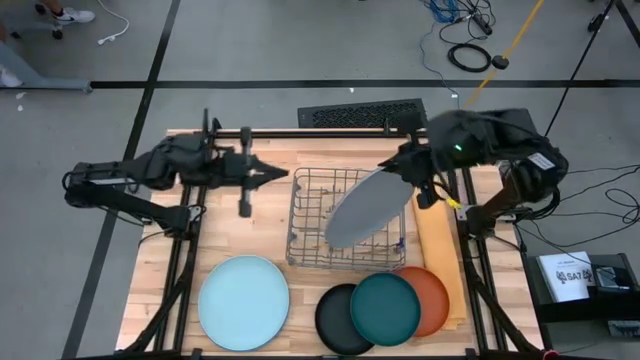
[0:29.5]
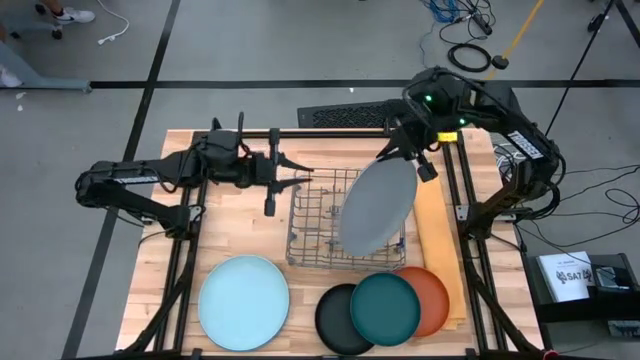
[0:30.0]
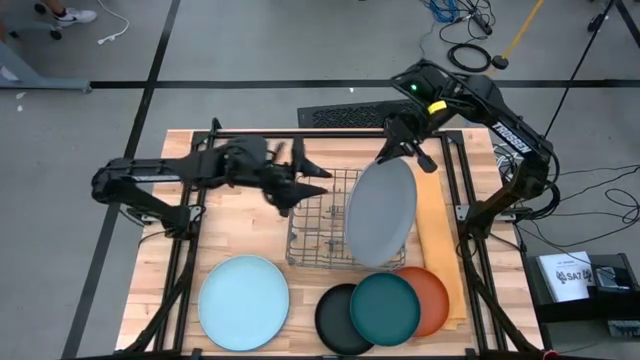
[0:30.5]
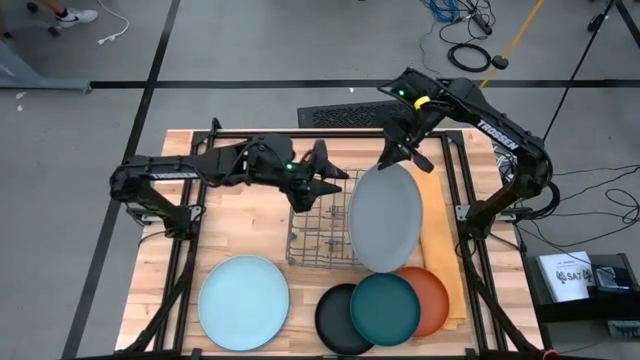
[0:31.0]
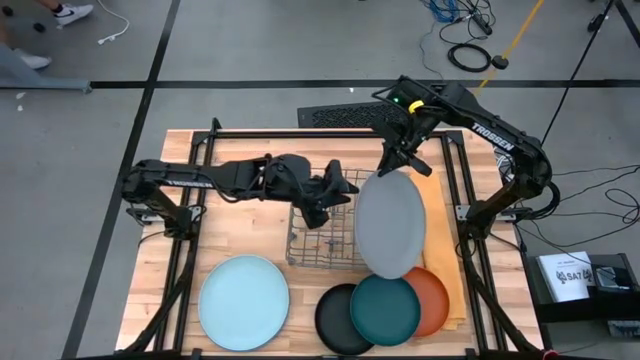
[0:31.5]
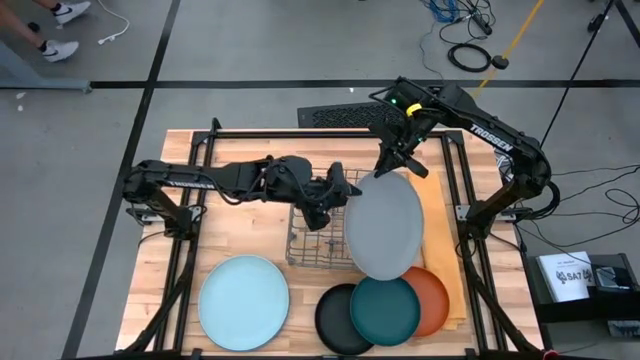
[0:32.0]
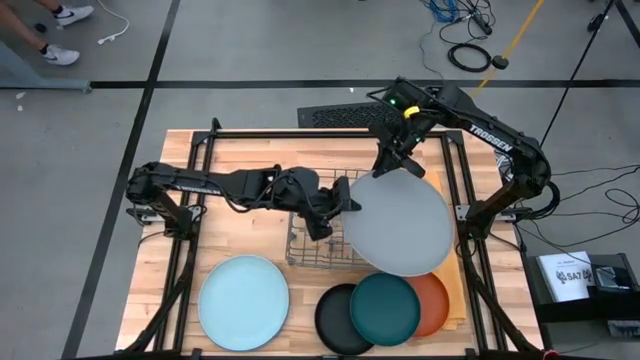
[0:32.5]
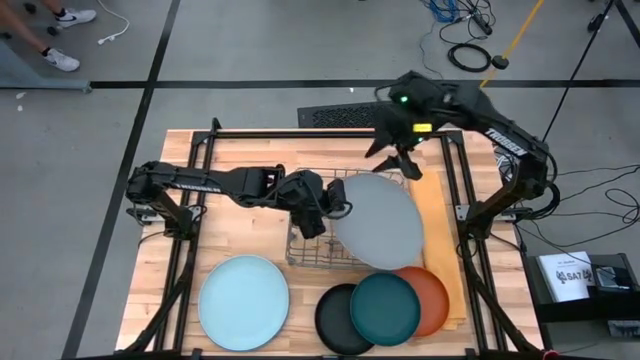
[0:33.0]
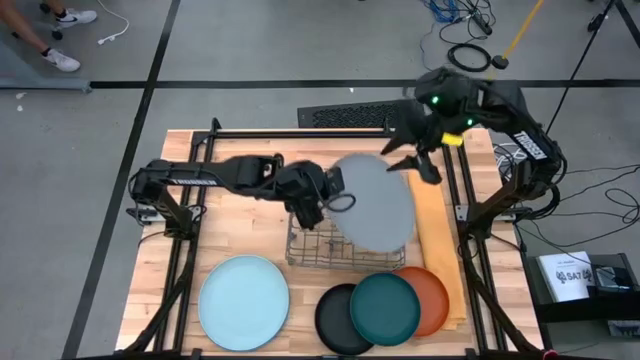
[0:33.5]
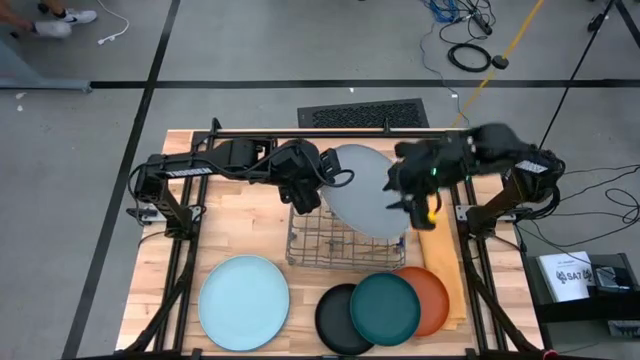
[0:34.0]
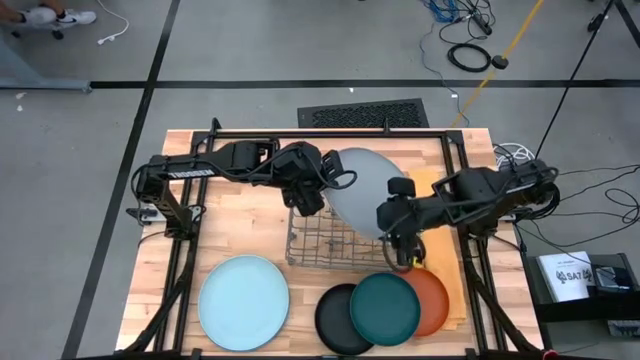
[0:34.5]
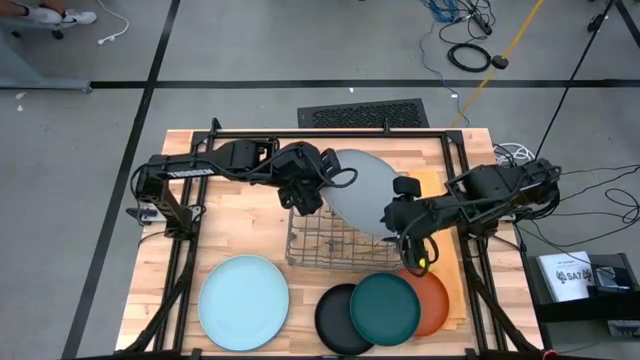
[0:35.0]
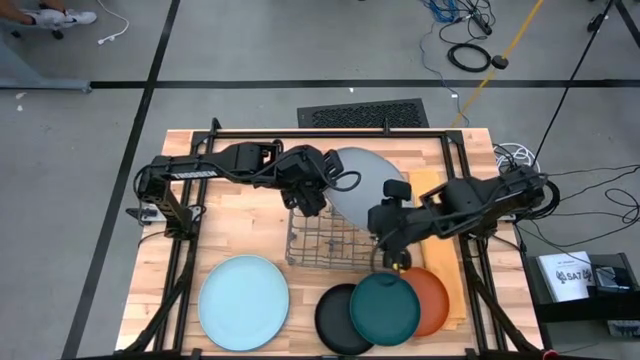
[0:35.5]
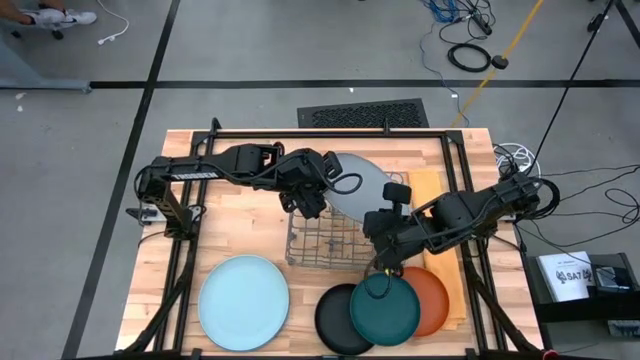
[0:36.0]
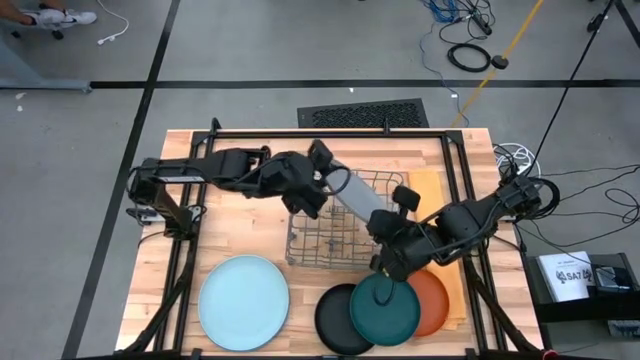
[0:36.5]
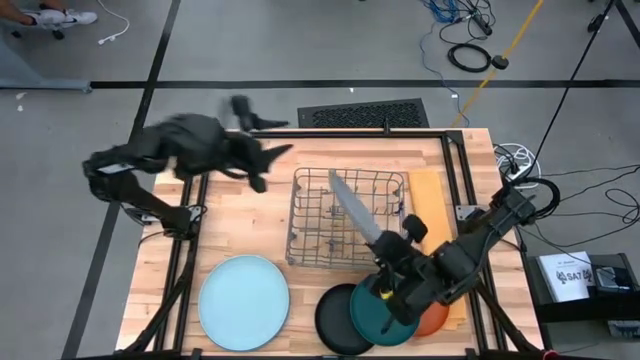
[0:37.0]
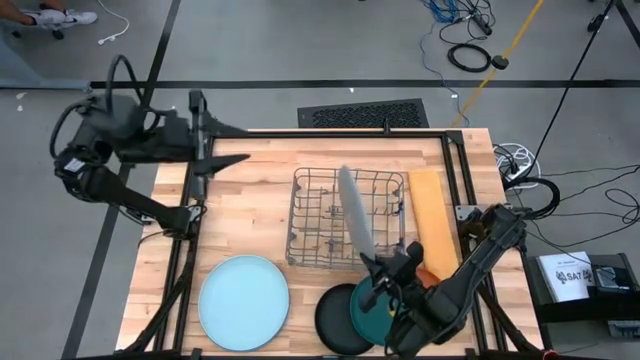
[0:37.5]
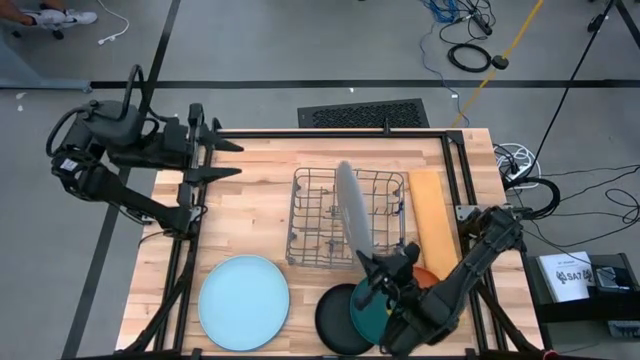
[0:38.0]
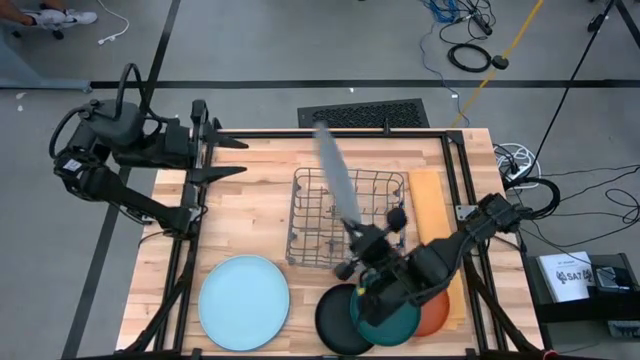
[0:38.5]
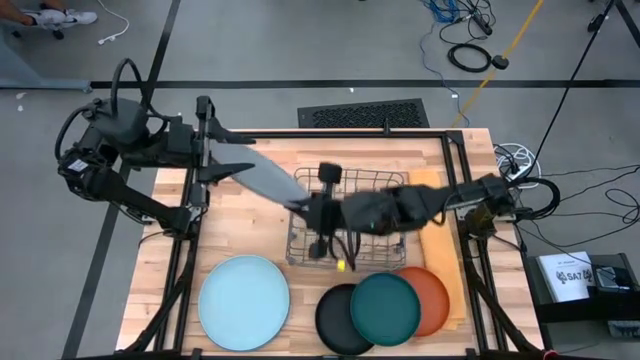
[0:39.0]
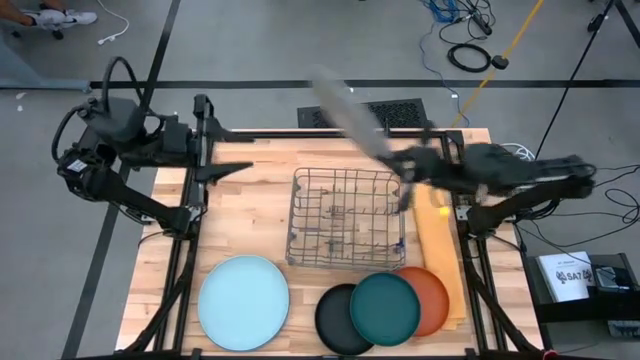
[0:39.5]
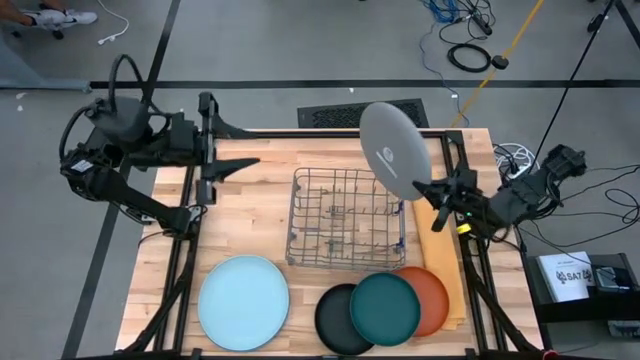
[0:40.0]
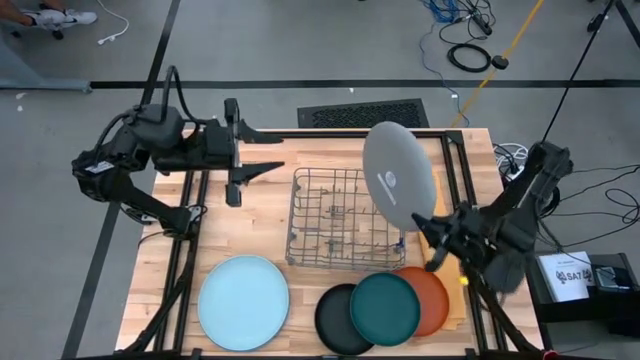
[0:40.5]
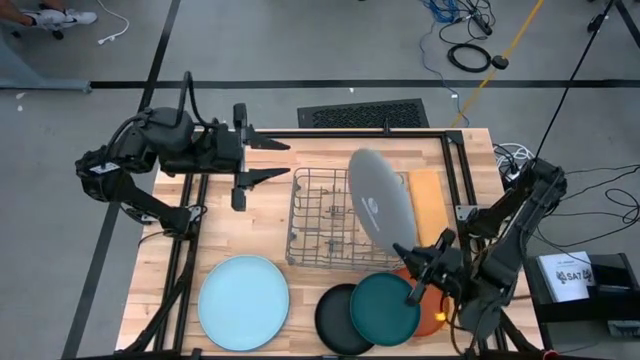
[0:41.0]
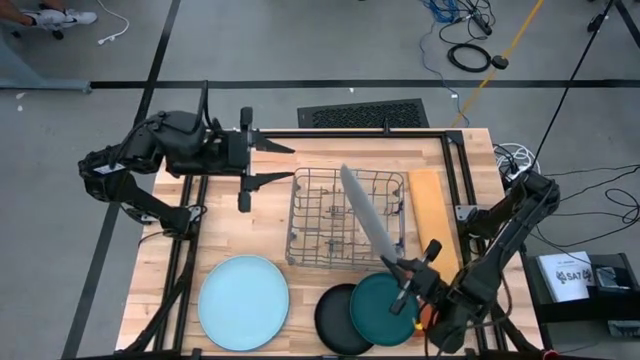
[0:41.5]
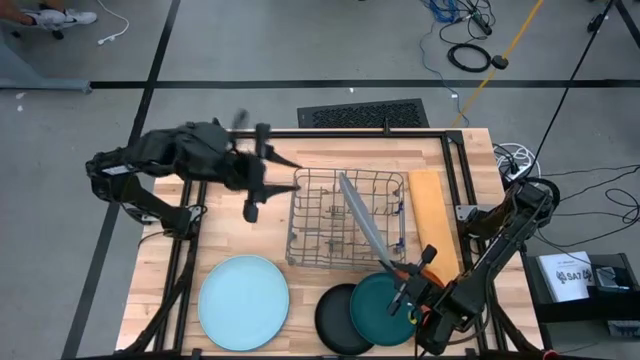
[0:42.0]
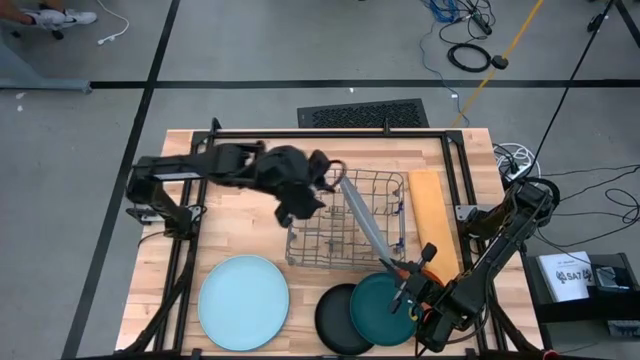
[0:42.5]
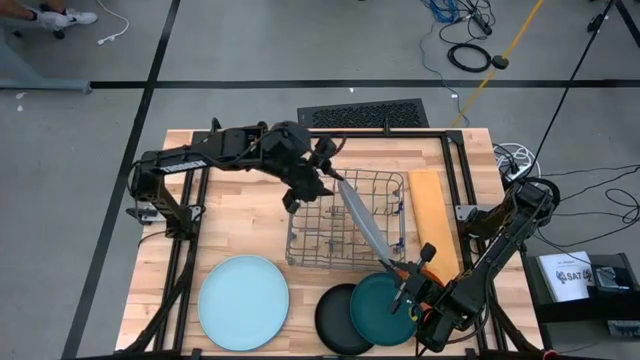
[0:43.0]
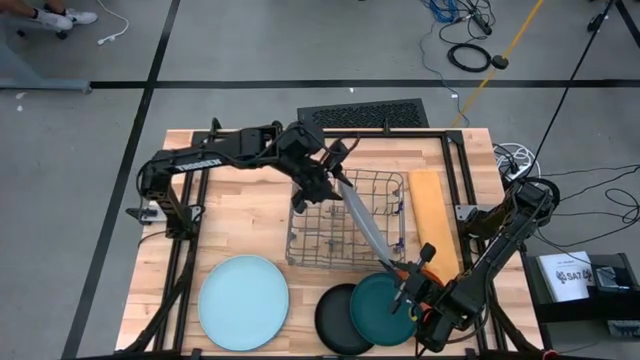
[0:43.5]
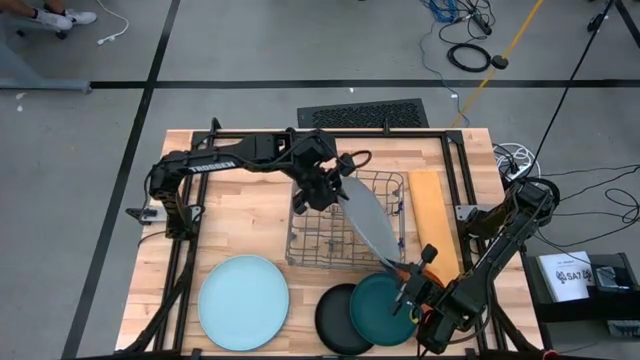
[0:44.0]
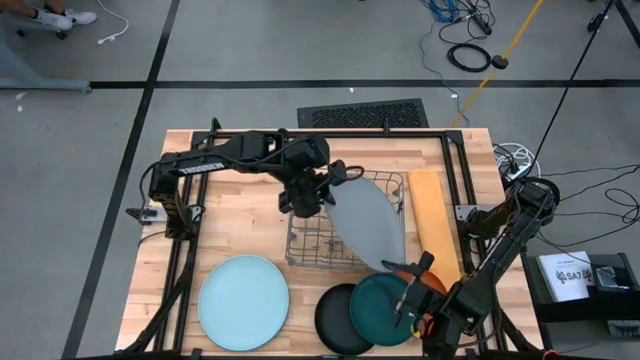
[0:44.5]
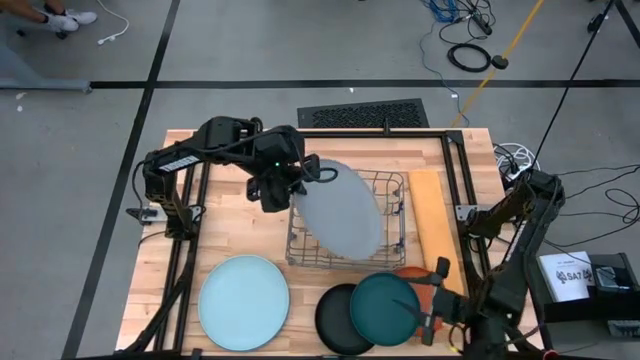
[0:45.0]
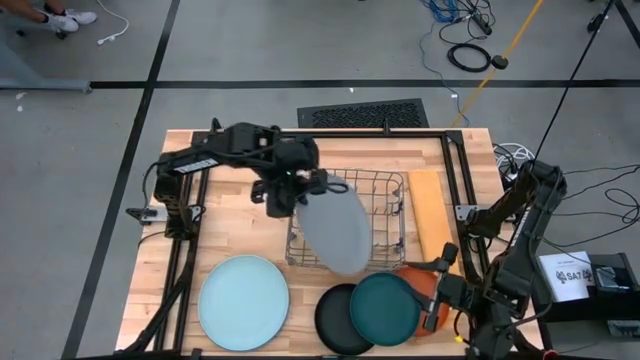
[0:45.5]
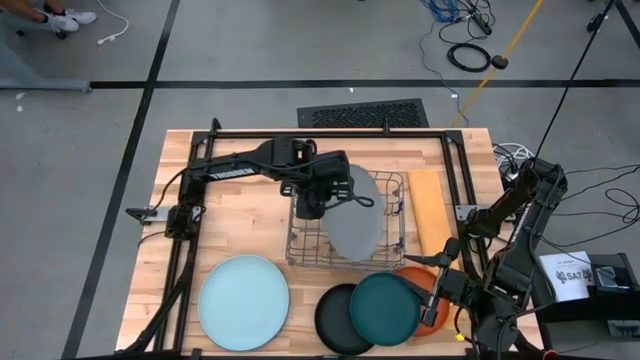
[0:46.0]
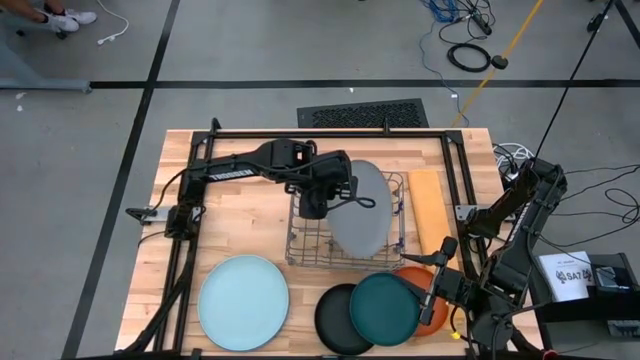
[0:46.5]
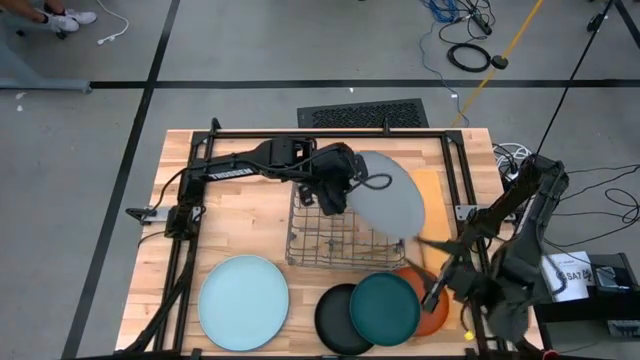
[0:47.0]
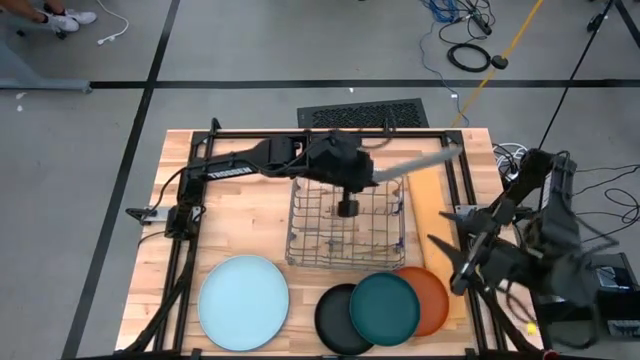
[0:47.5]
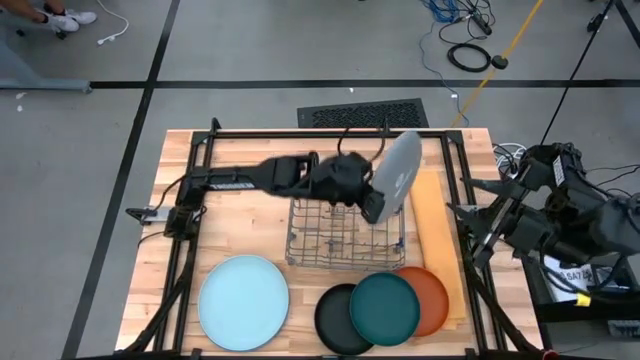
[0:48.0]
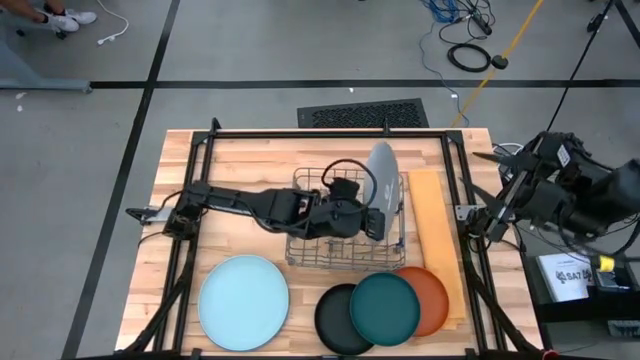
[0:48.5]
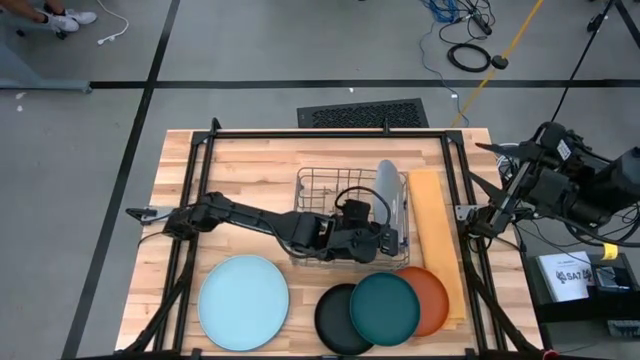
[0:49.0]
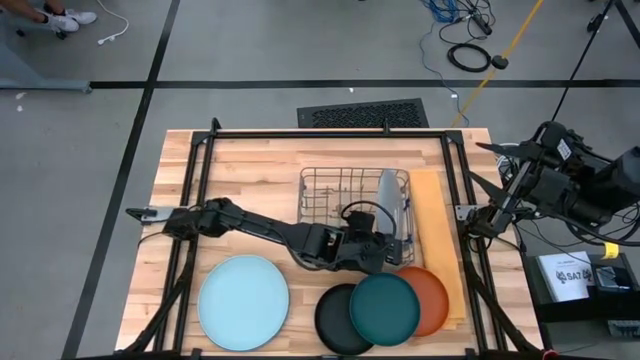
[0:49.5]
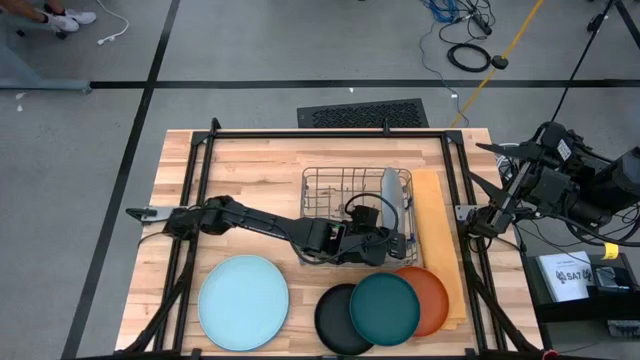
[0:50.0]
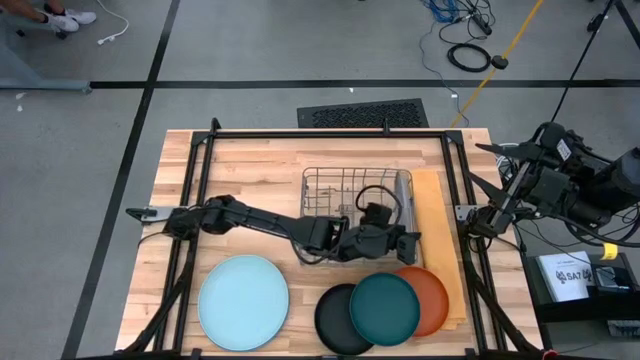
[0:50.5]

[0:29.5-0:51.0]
Task: Sort dishes
Put the gray plate into the dish rack
